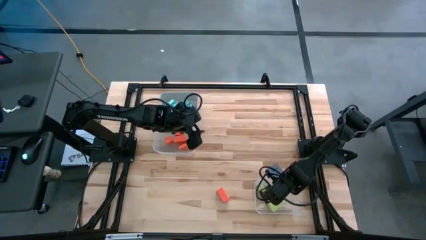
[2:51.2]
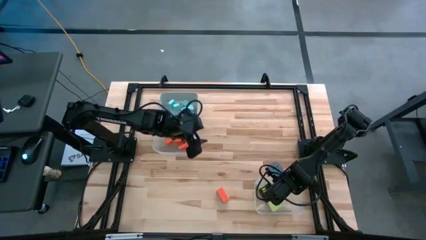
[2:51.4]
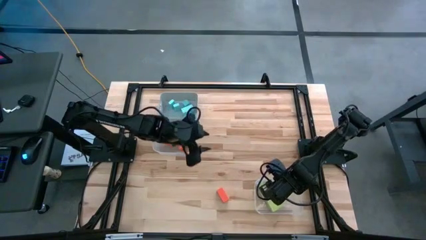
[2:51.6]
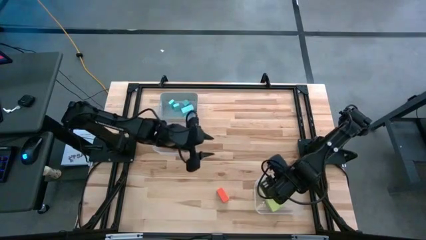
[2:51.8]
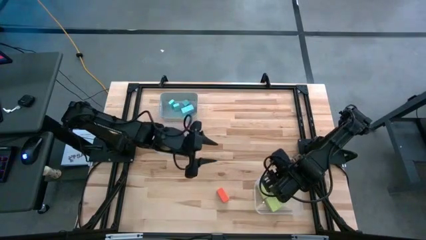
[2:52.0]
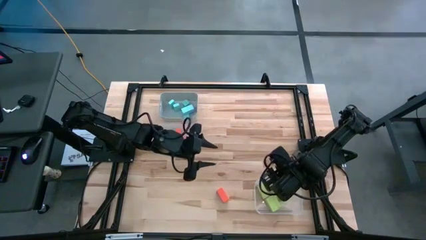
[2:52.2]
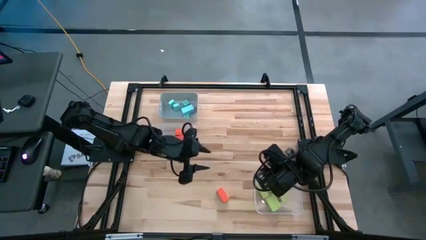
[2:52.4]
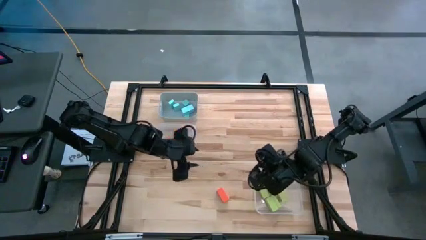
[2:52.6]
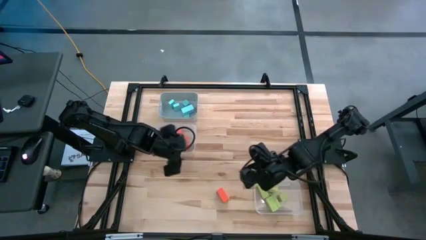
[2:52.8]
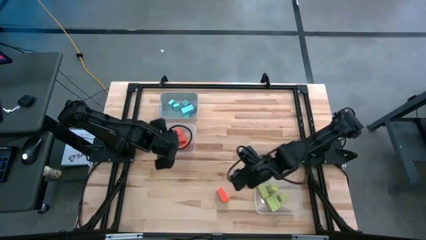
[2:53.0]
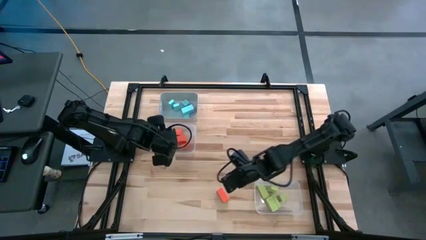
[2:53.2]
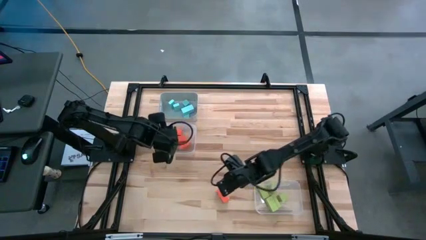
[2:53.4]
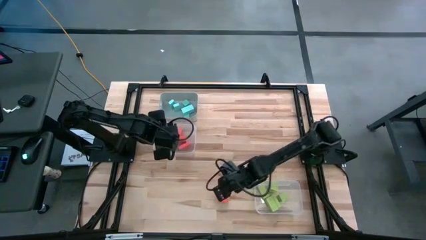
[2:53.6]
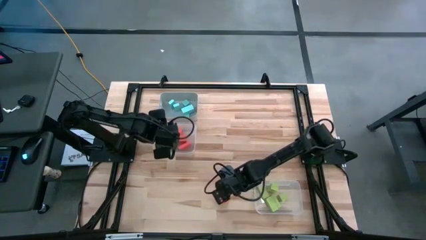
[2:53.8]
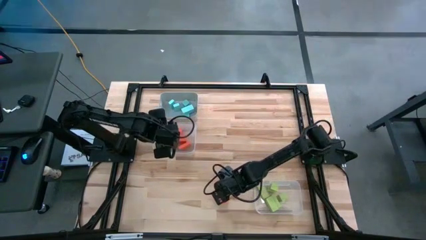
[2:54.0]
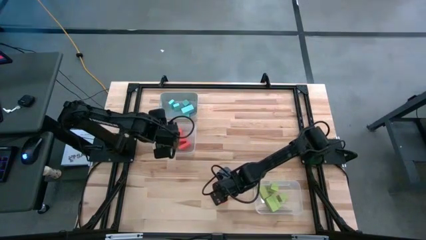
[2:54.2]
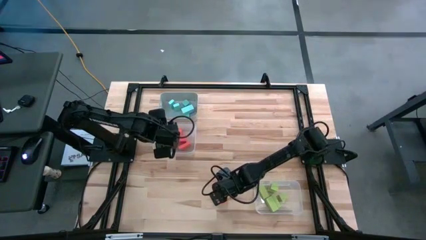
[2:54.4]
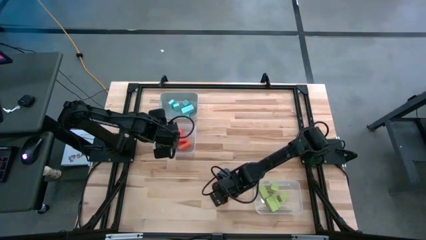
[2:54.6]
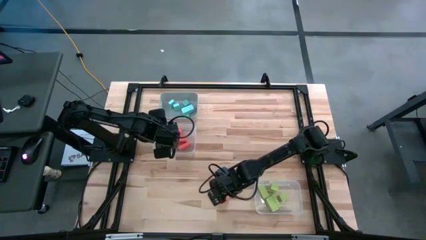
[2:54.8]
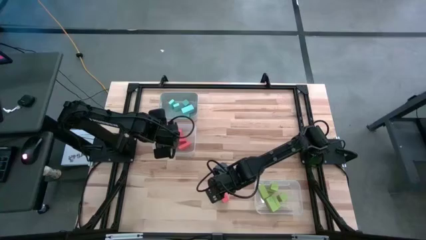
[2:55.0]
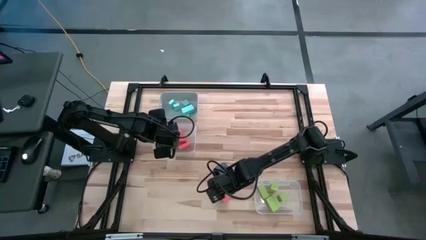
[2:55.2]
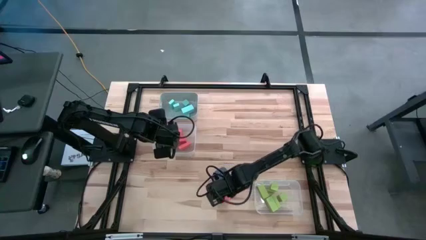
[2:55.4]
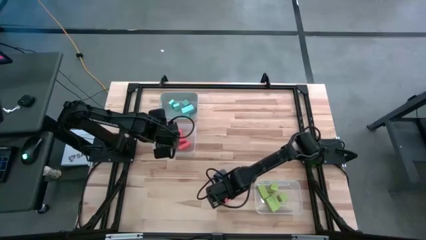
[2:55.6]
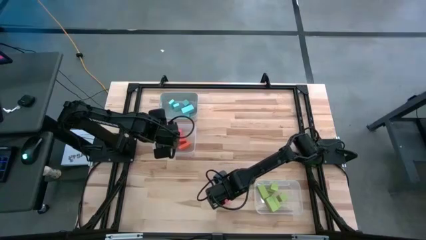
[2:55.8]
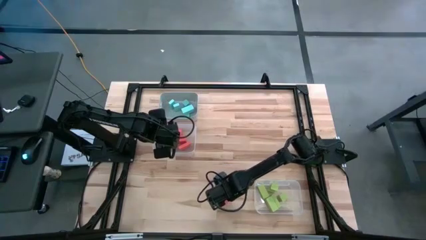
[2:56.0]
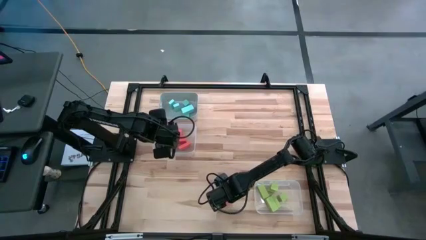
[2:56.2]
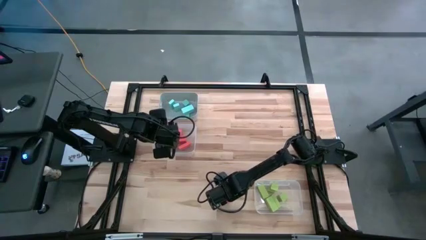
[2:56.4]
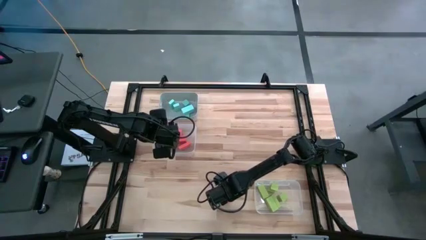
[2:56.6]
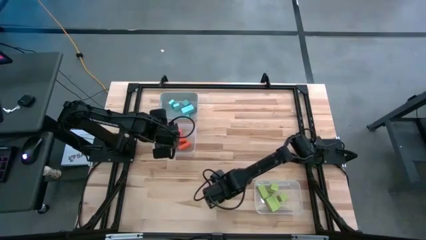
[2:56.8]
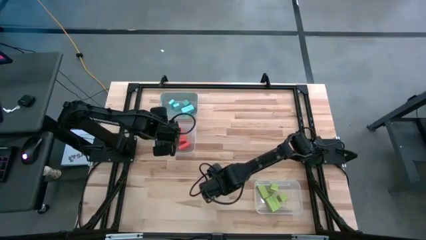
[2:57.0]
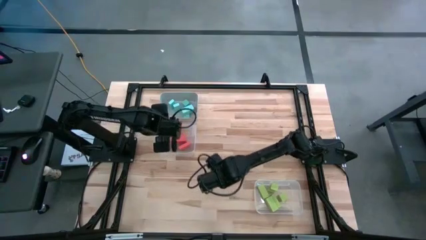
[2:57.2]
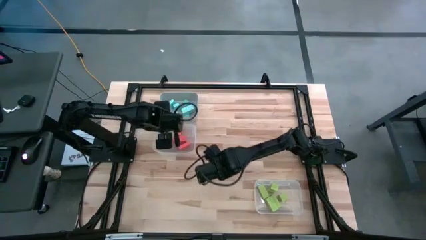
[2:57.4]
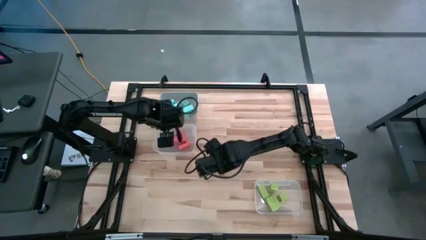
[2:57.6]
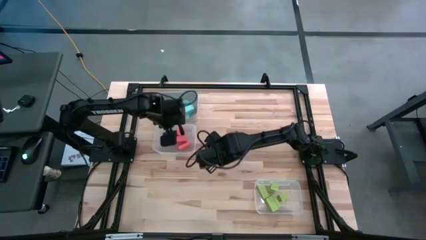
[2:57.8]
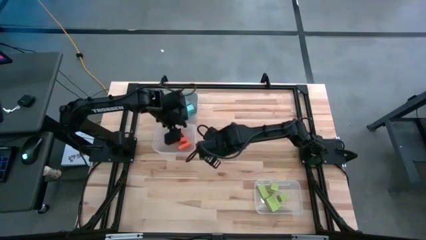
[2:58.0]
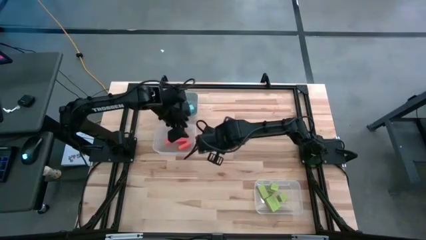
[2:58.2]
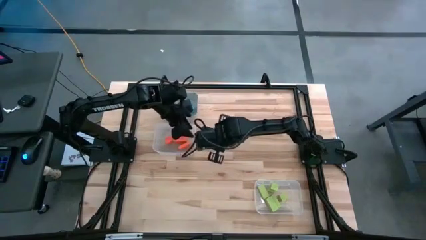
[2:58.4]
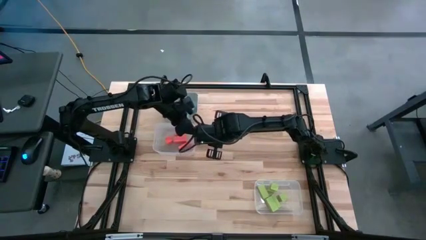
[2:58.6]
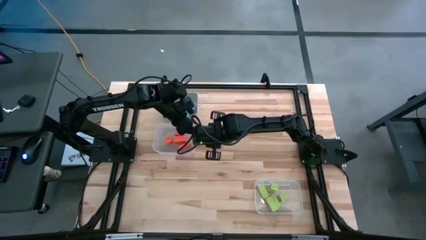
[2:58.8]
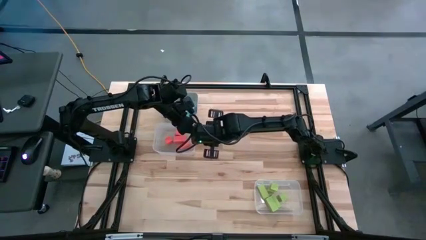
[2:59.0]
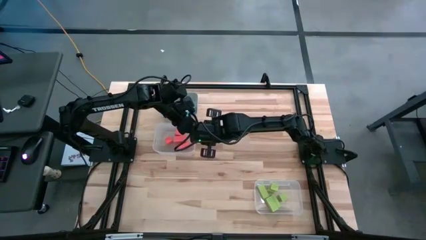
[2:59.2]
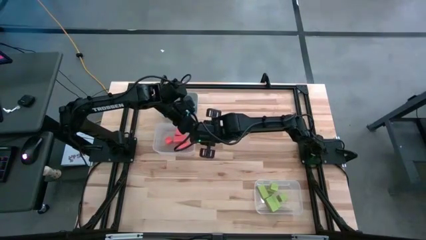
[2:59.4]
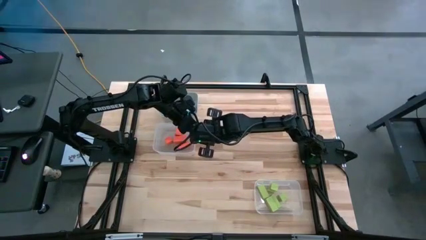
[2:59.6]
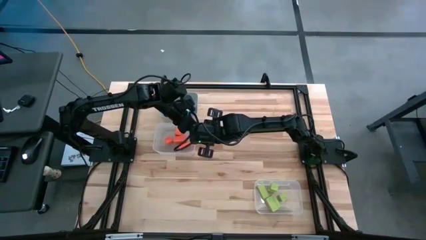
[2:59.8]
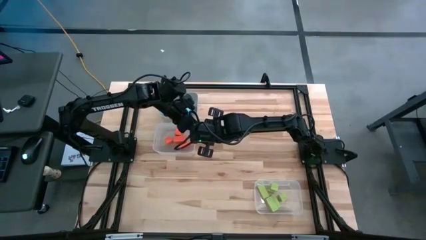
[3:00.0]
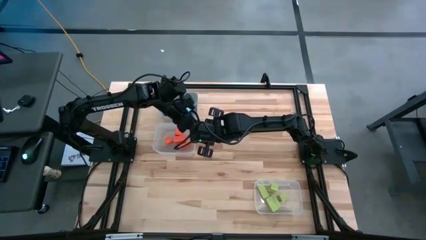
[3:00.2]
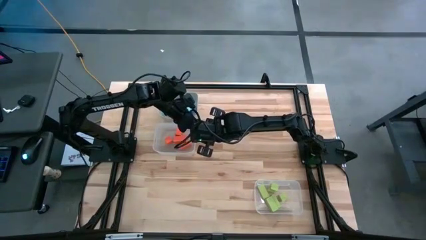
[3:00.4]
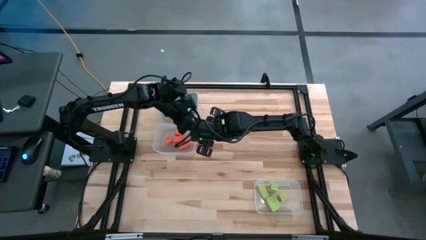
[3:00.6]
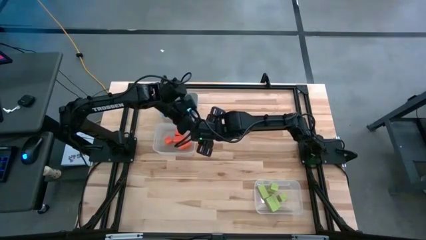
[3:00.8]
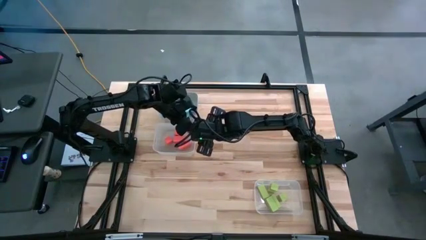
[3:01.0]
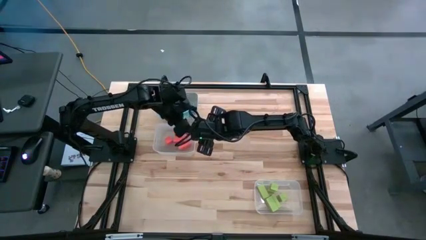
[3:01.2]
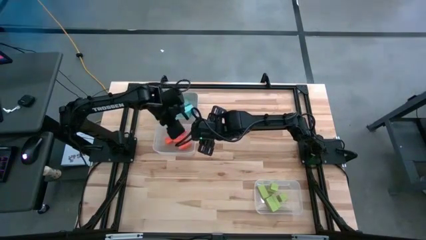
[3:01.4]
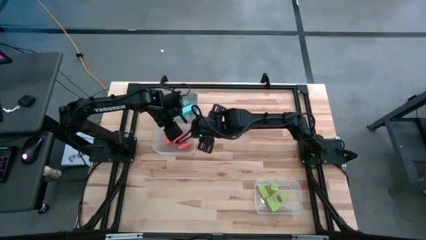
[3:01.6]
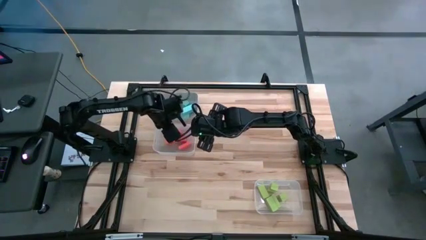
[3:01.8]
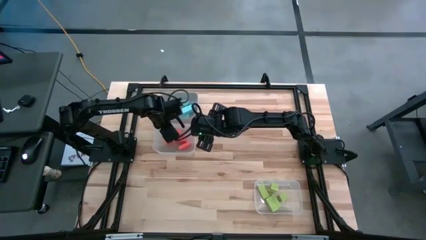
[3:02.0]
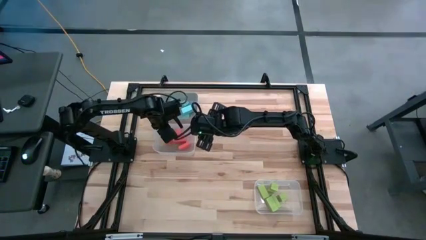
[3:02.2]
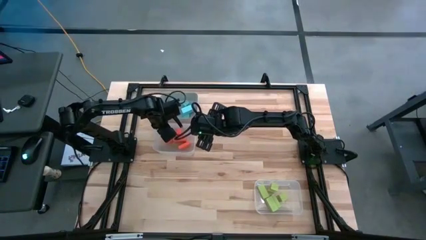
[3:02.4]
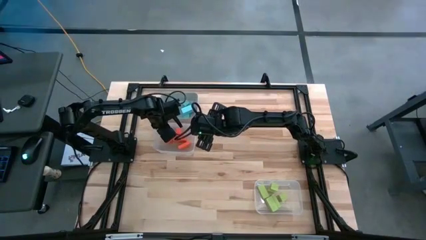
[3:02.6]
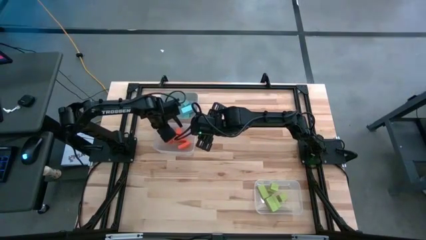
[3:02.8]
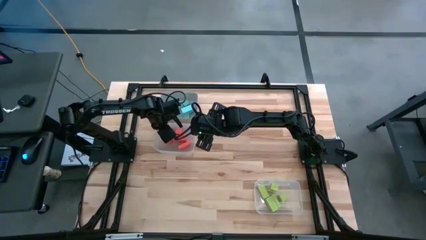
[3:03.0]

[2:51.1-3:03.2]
Task: Sort & place blocks by color
Put the orange block into the top transparent bin

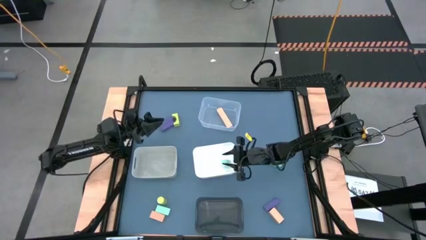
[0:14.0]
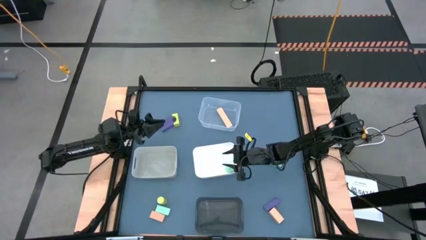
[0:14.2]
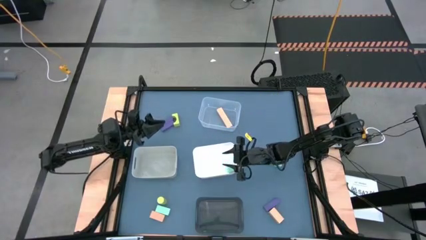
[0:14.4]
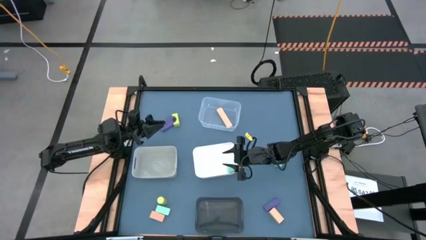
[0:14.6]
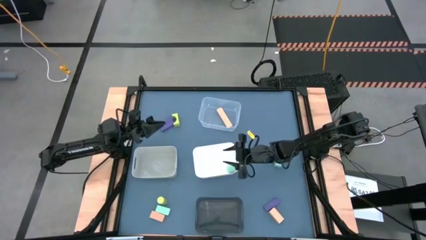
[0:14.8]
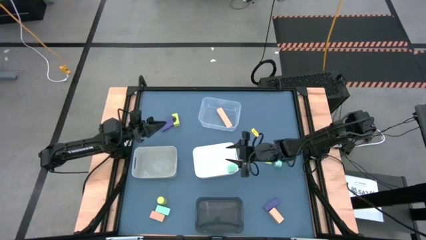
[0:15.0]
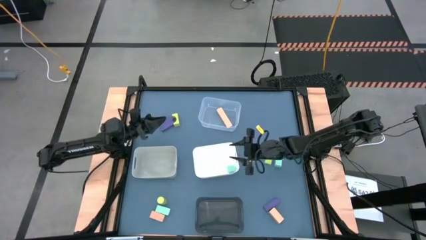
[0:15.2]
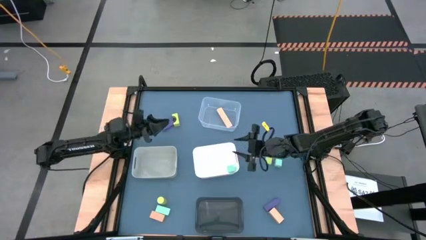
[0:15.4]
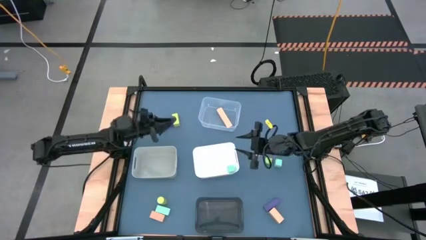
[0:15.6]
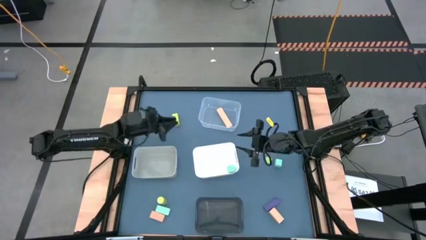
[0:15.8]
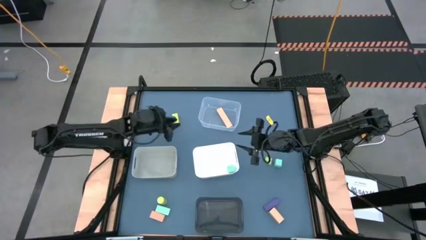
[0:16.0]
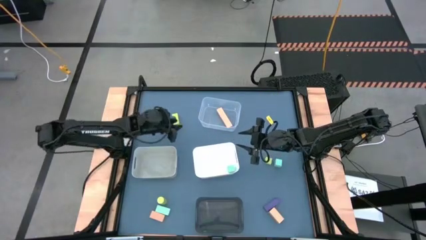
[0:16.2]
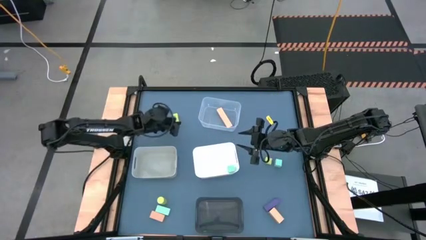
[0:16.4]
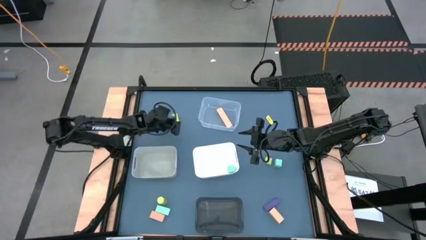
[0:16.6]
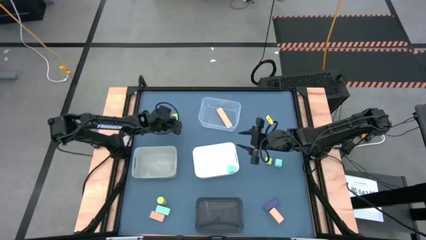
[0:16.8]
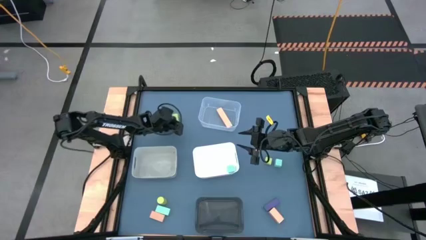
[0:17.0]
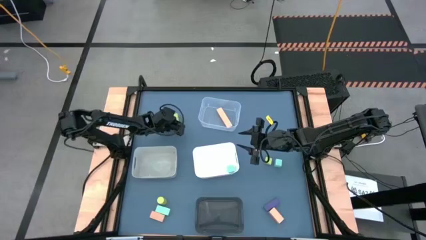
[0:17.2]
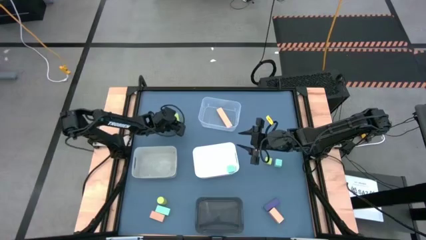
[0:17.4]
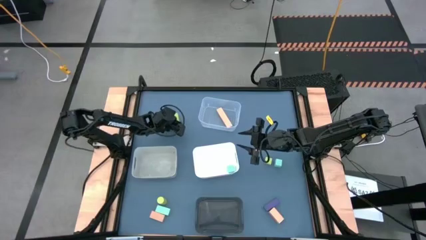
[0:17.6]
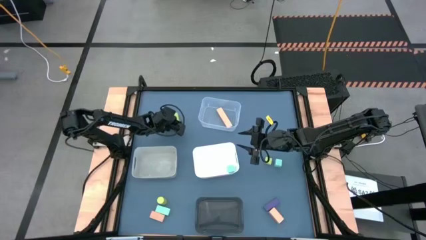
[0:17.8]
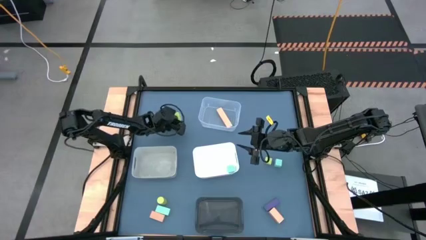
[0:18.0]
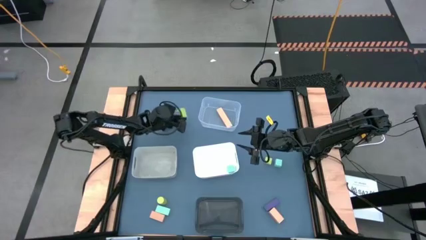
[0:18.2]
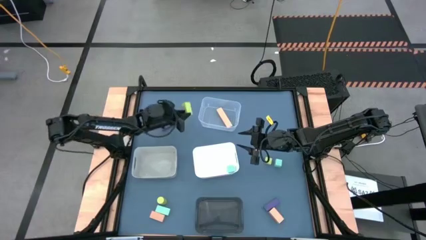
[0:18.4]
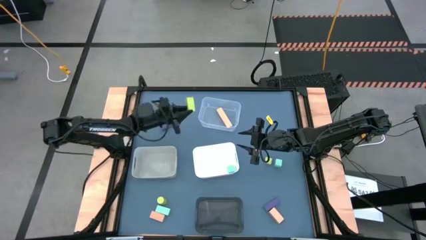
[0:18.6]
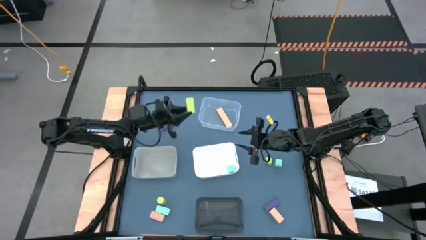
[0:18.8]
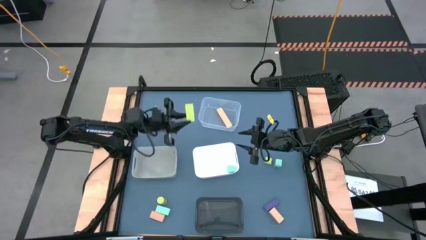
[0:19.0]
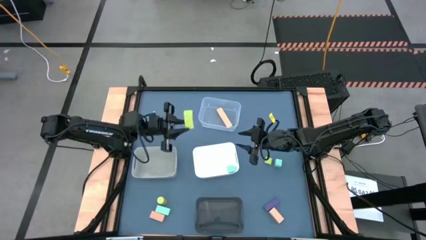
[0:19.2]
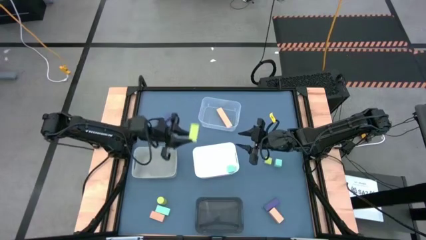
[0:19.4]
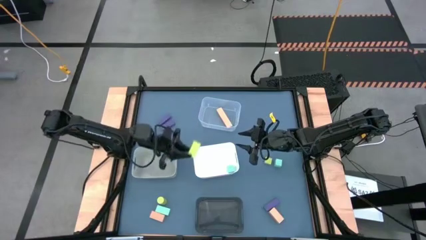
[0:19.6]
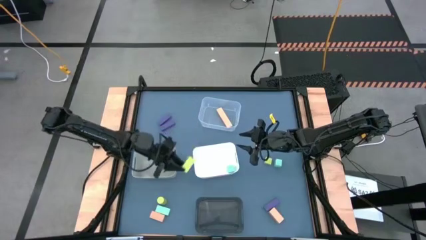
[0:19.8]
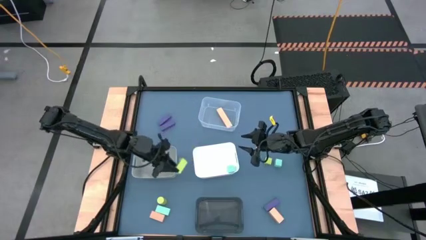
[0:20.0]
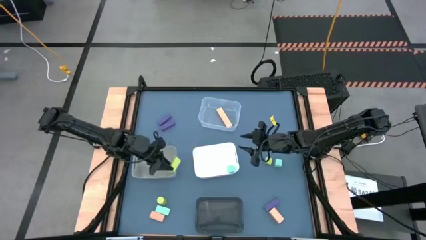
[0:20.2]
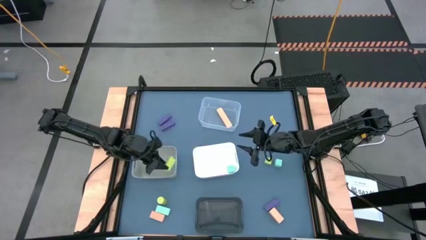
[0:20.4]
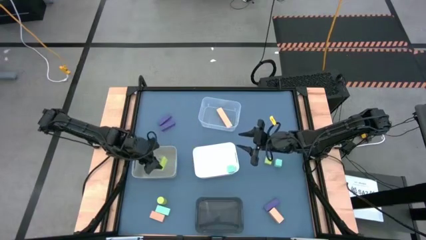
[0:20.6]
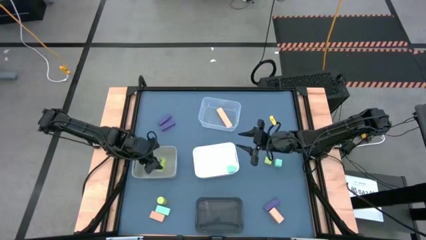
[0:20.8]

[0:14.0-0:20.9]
Task: Sort & place blocks by color
Put the top green block into the gray bin
